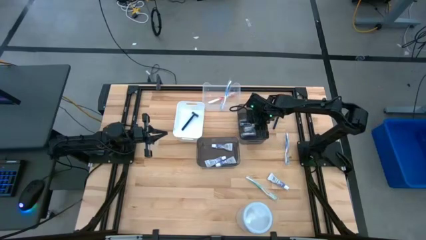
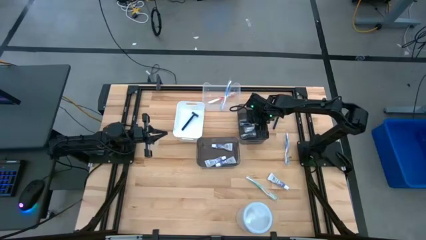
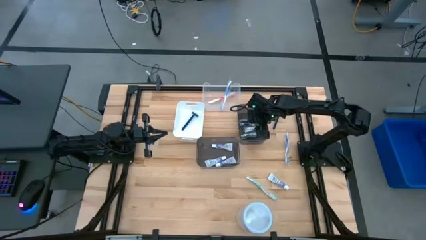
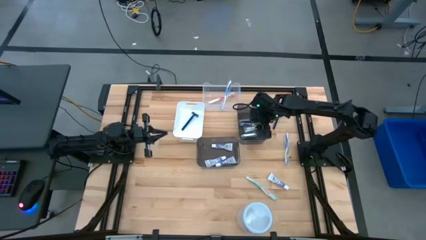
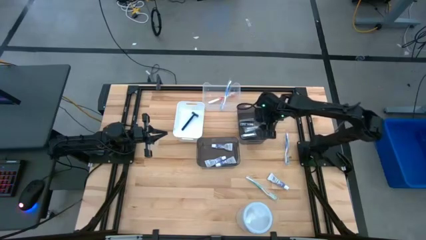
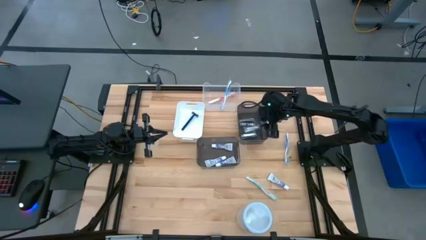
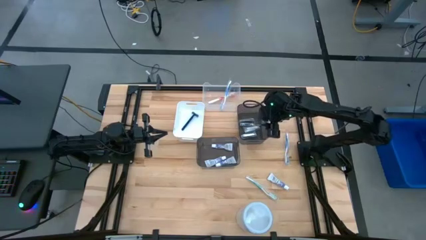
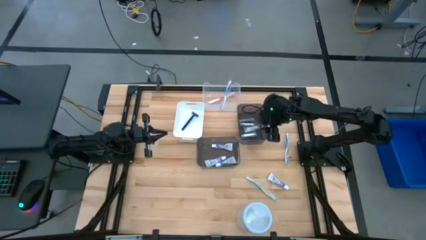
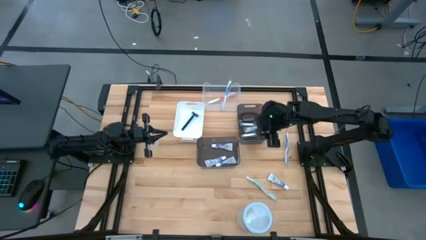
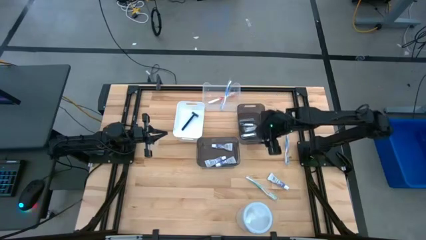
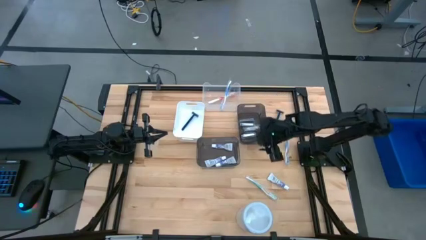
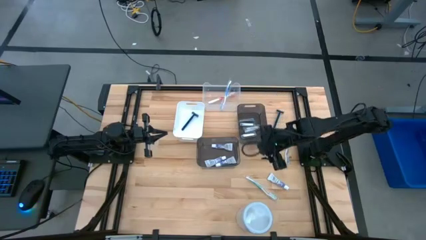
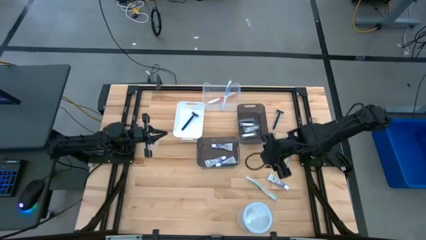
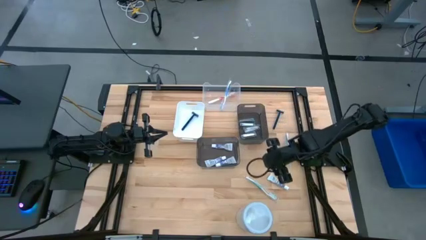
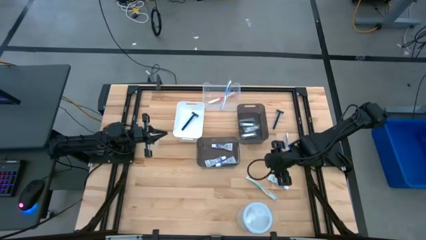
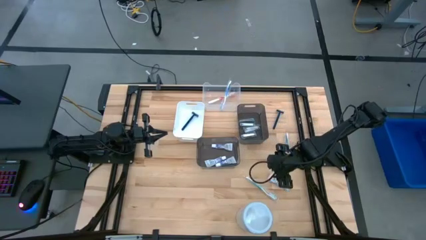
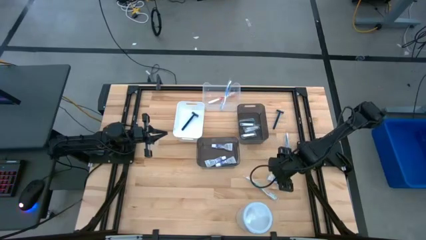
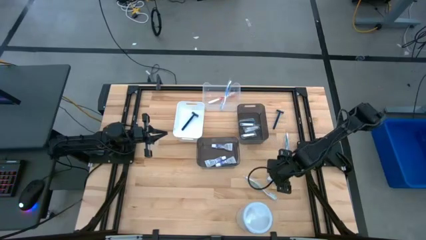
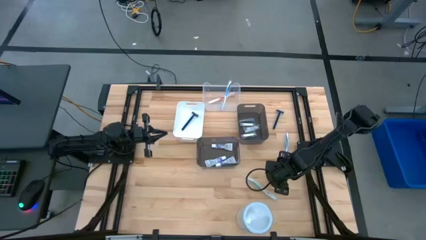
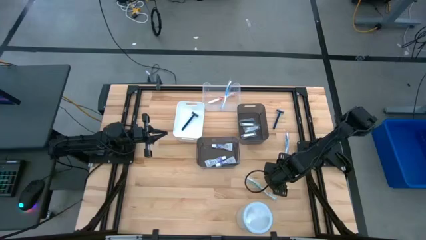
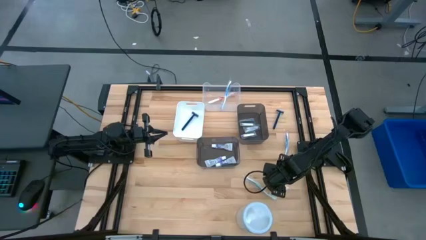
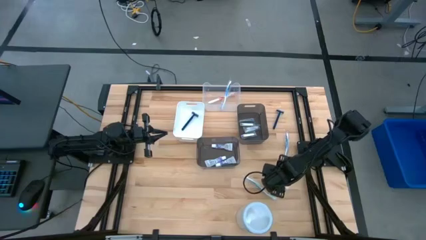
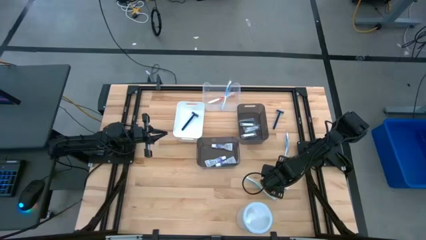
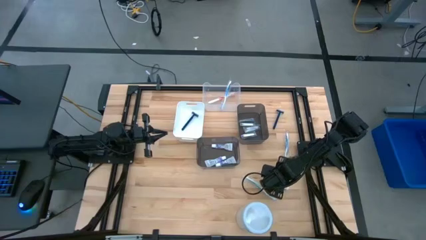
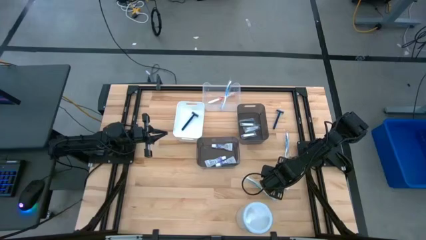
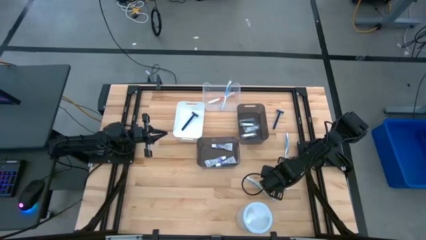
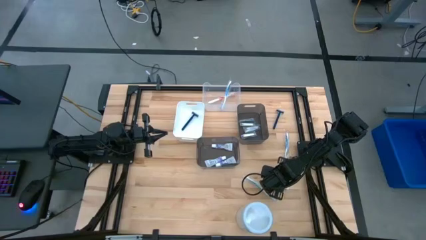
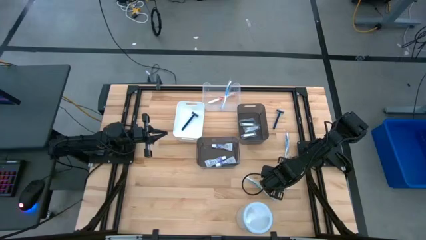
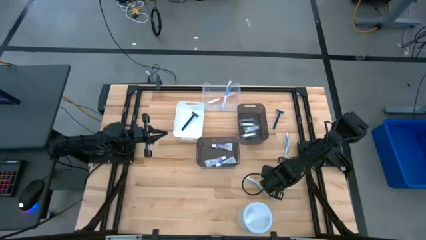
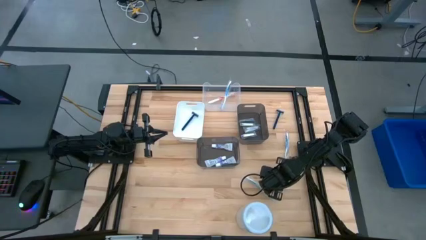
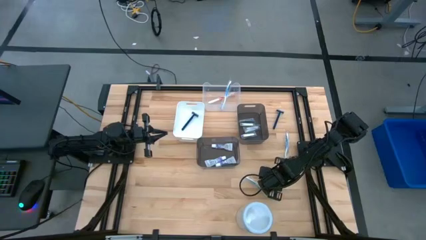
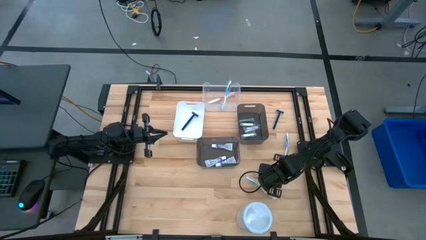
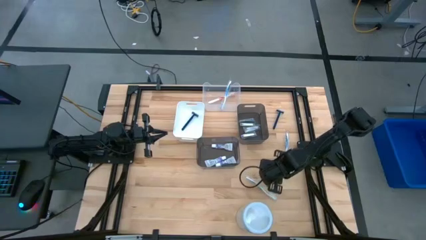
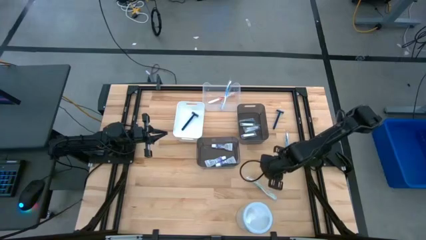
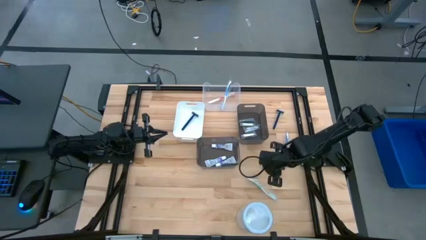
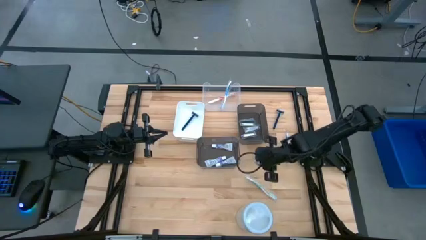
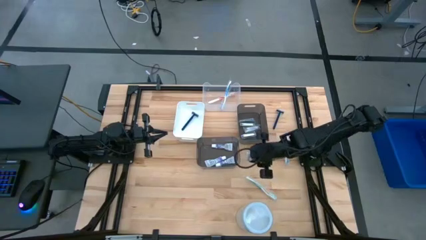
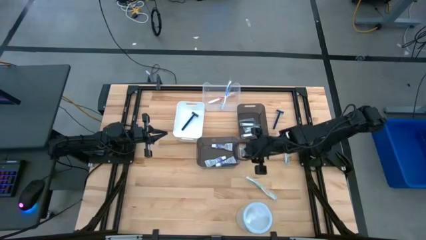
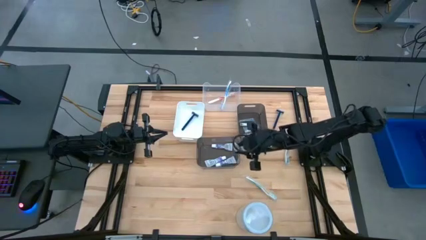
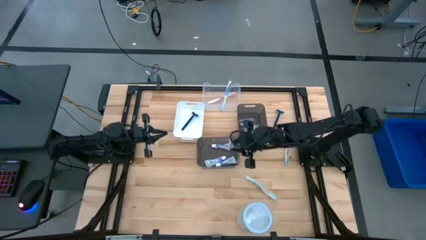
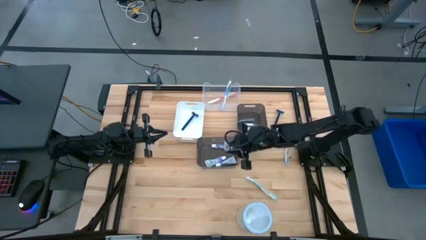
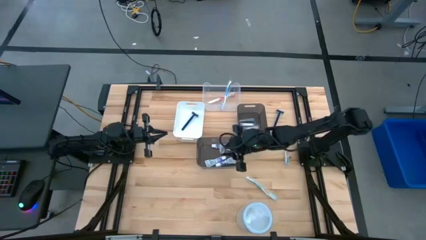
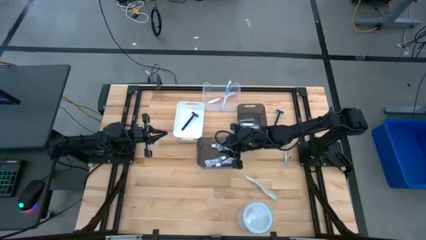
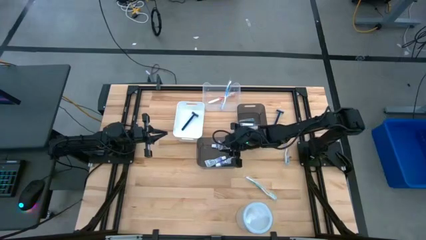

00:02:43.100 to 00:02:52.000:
Task: Pick & Place Travel size toiletries
Put the white toothpaste into the bottom black bin

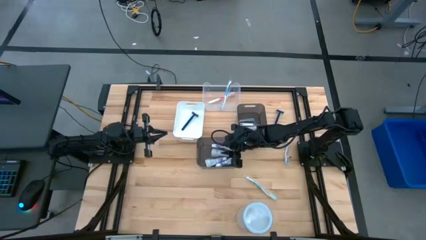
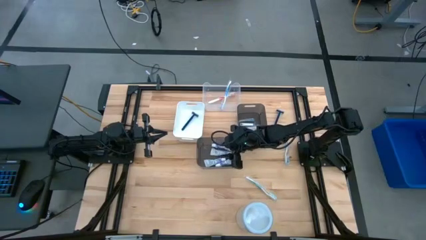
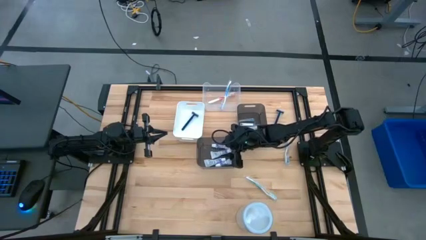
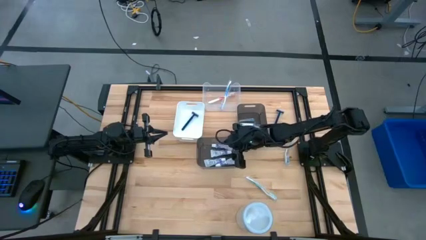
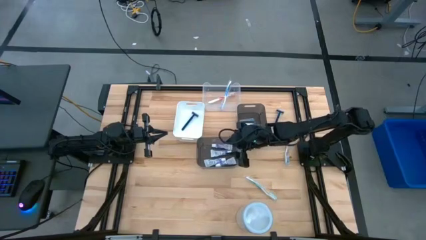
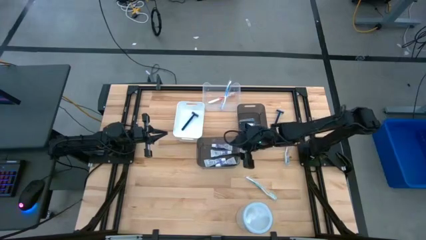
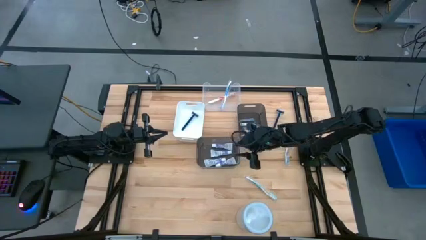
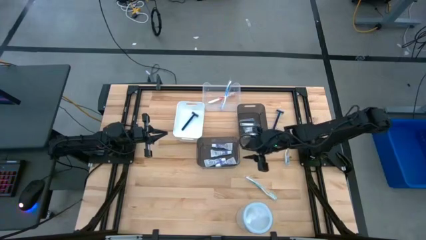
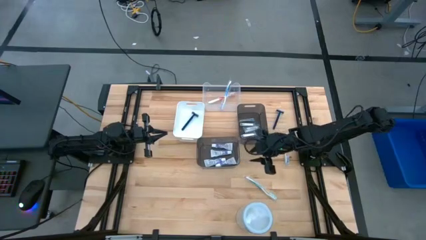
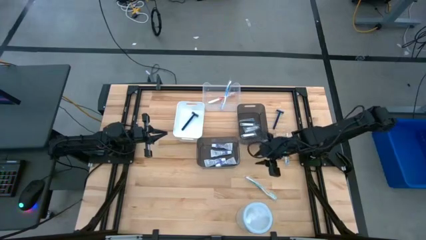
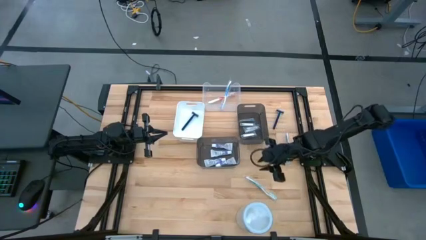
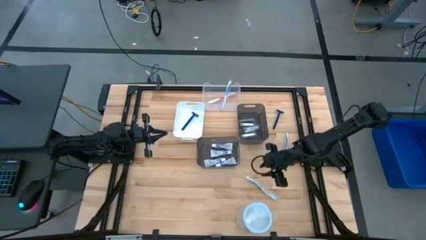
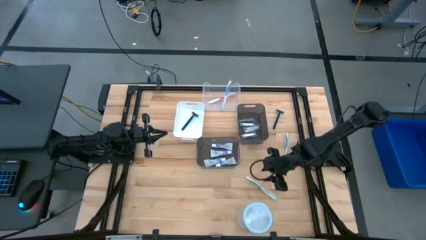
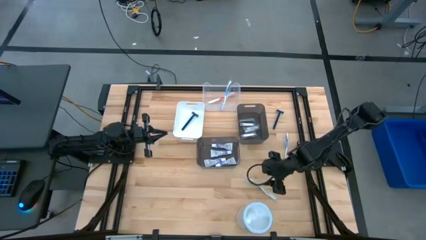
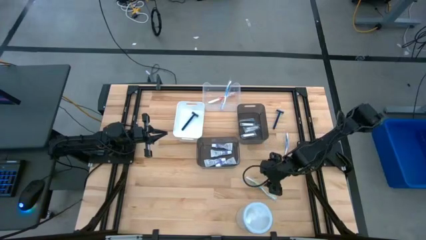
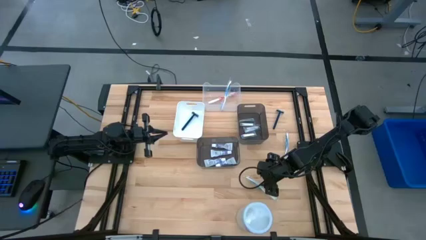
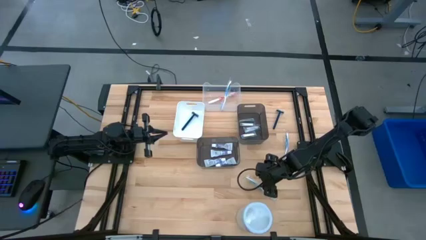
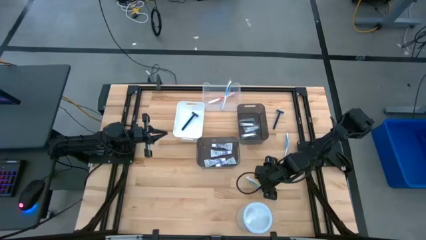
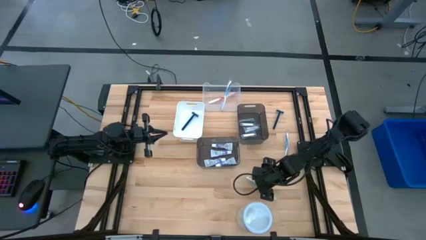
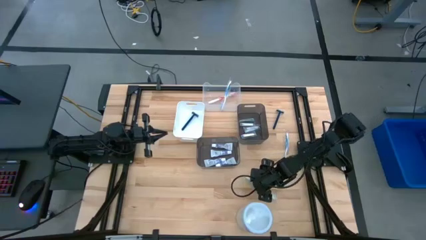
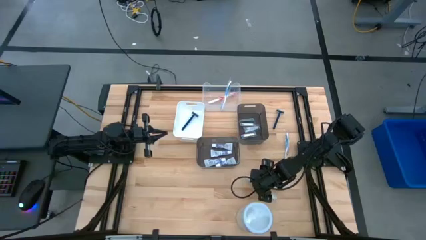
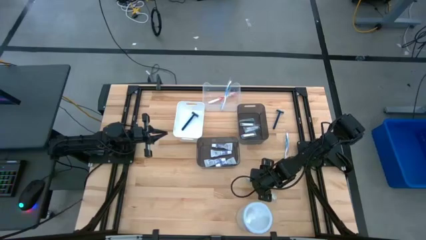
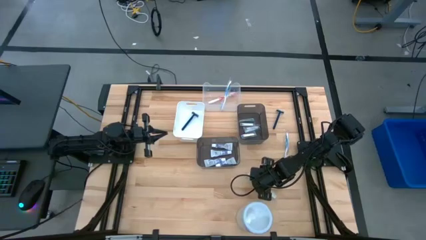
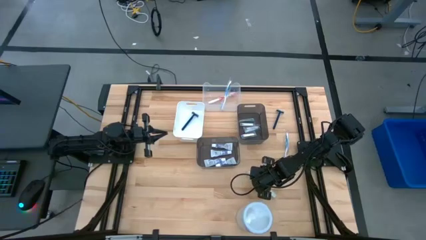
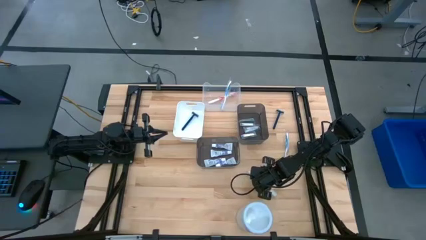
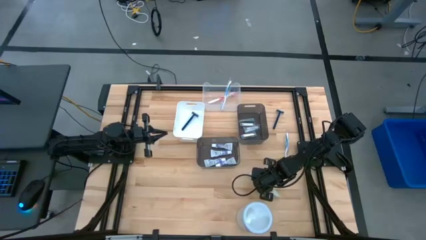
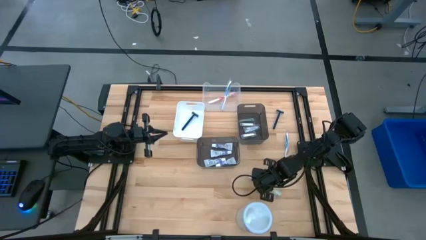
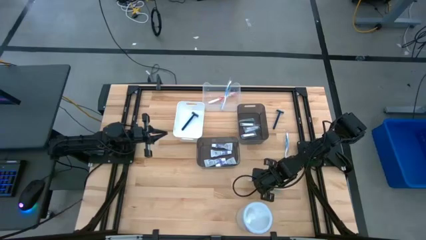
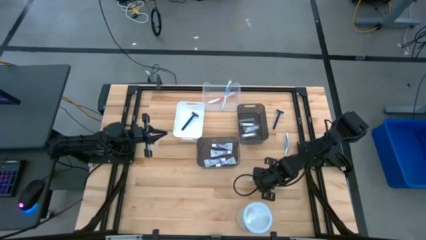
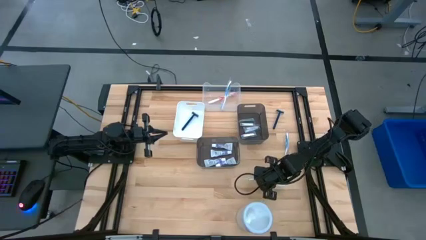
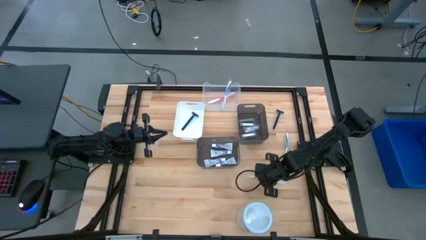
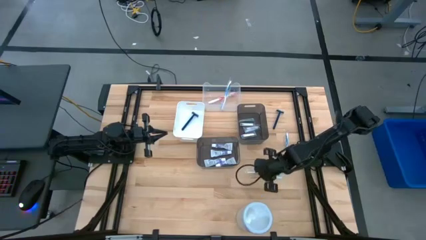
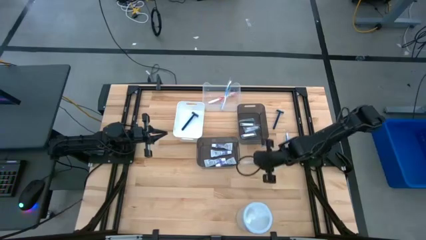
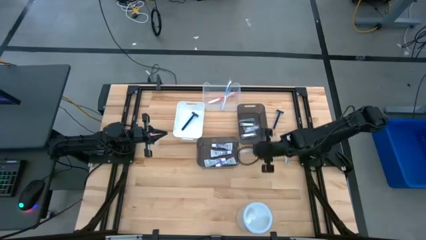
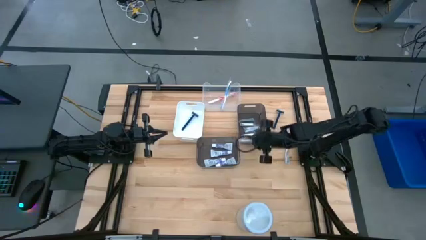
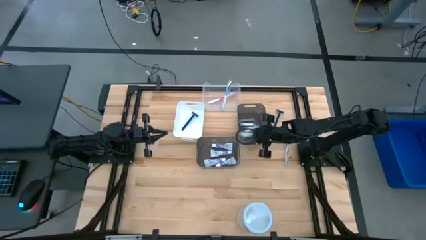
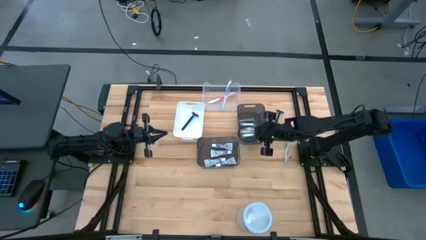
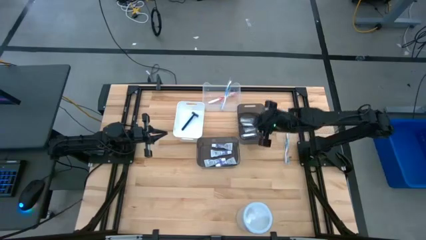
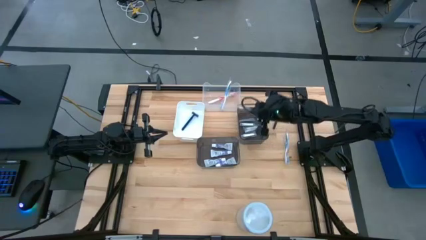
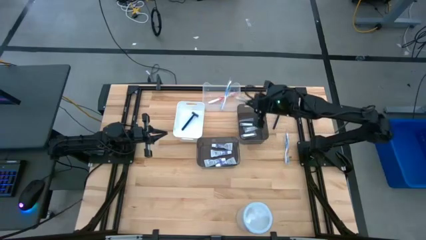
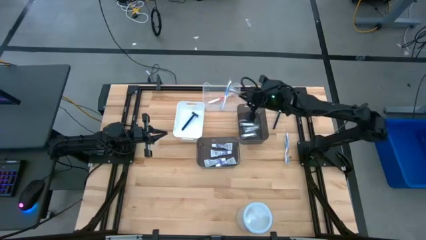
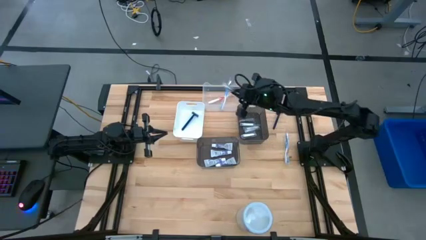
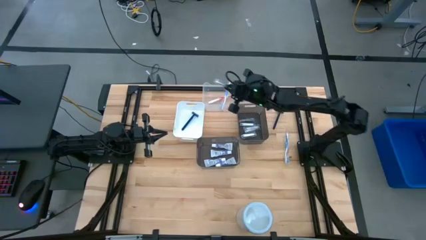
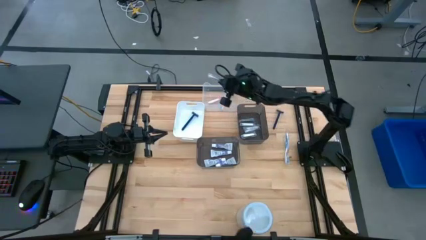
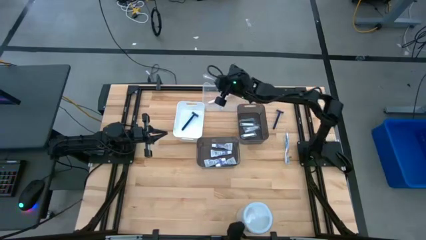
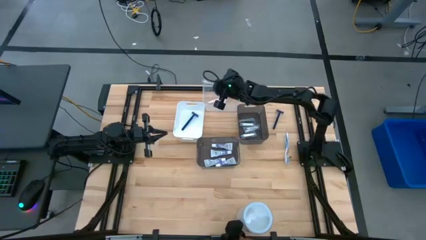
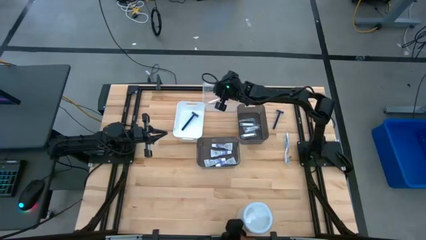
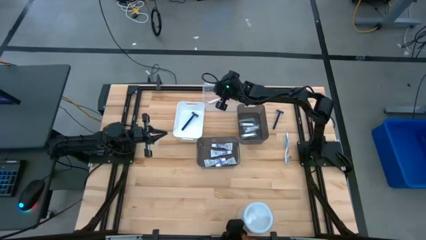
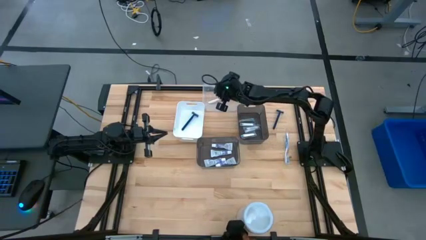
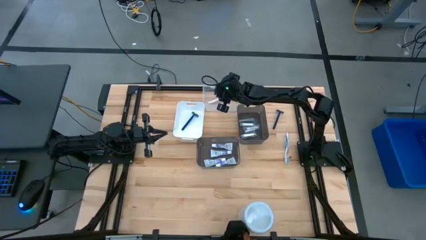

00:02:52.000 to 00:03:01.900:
Put the green toothbrush into the transparent bin
